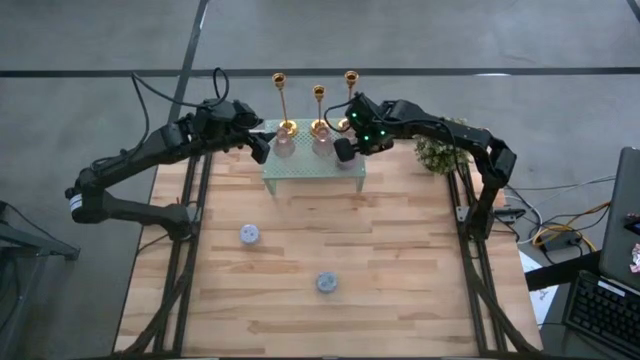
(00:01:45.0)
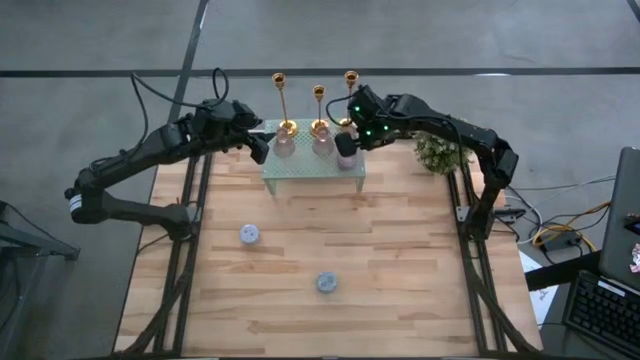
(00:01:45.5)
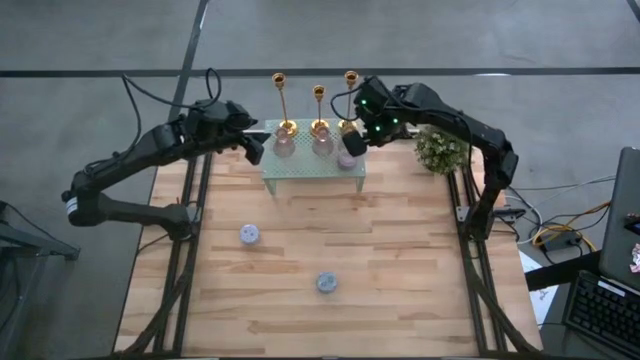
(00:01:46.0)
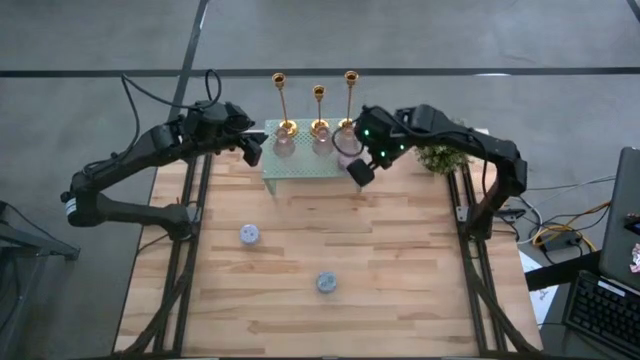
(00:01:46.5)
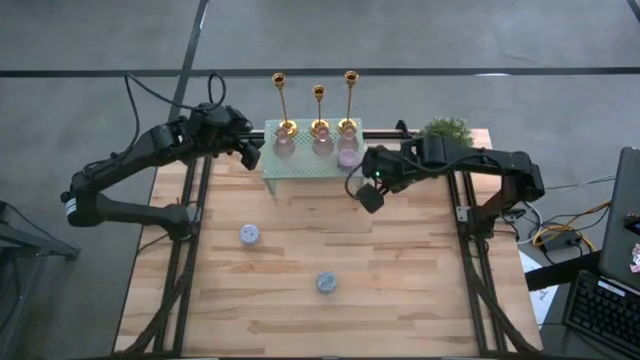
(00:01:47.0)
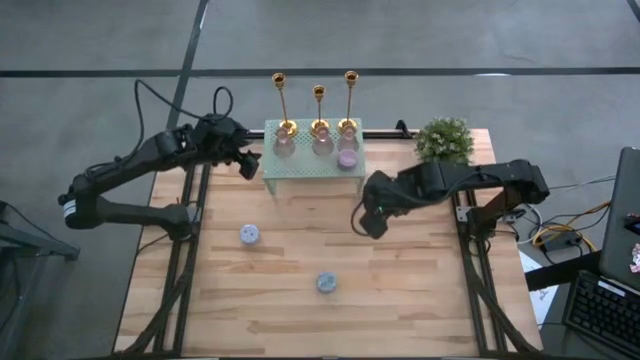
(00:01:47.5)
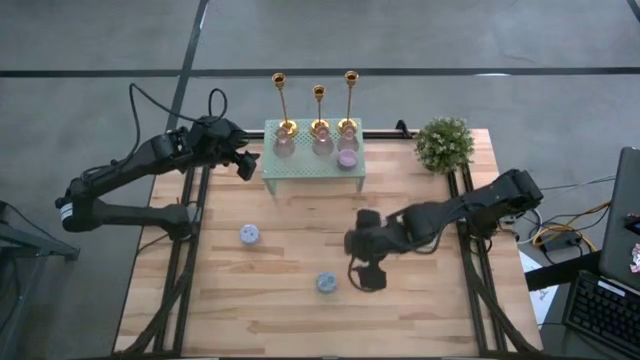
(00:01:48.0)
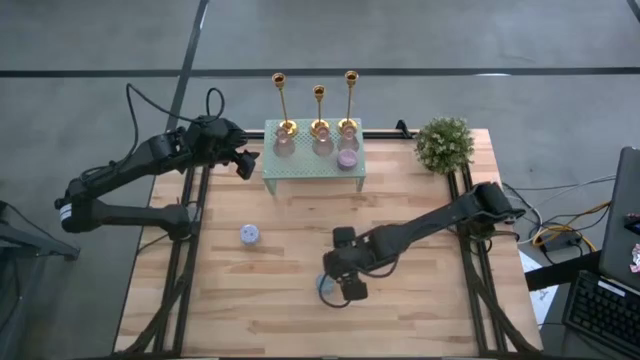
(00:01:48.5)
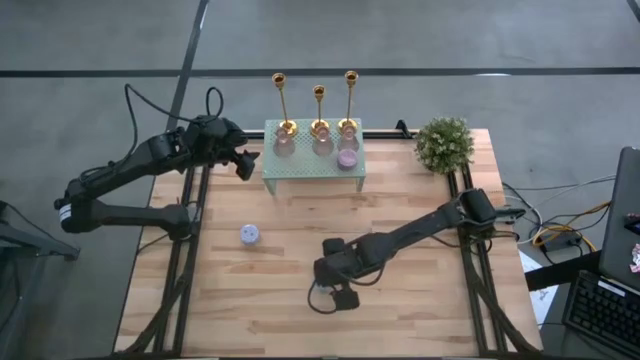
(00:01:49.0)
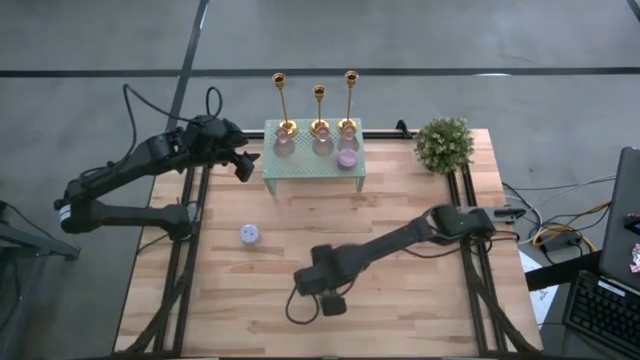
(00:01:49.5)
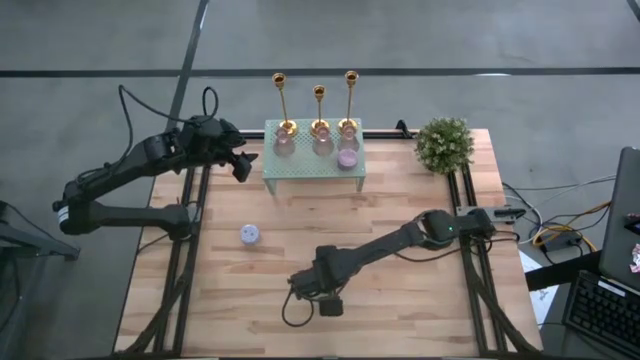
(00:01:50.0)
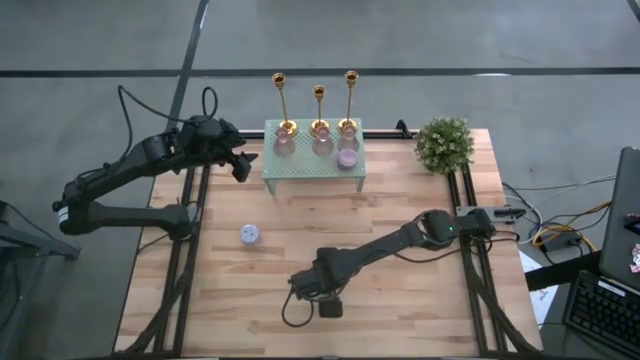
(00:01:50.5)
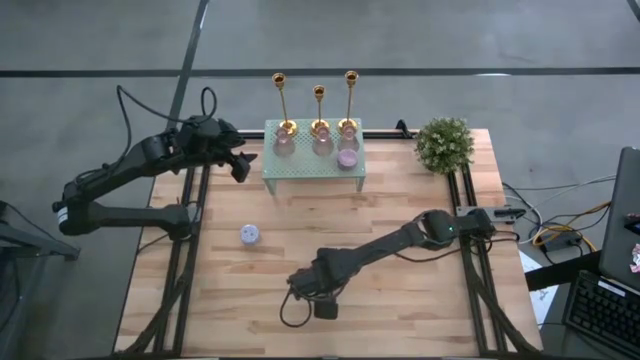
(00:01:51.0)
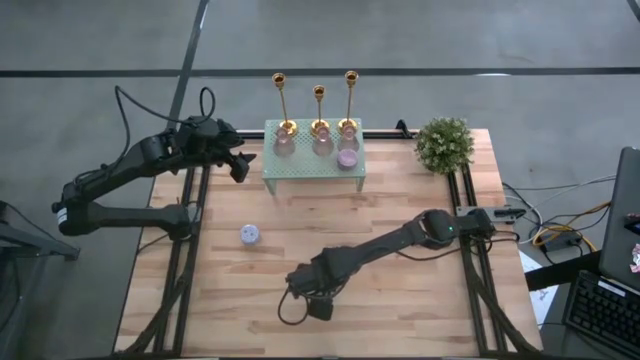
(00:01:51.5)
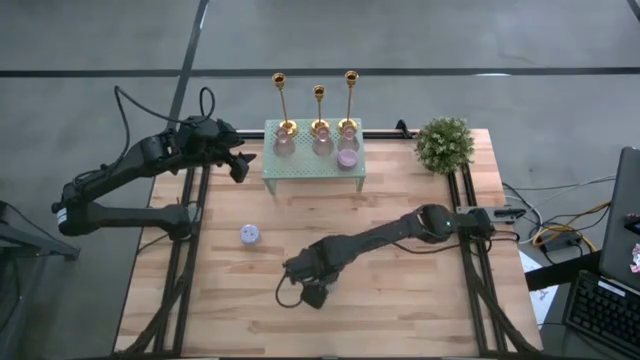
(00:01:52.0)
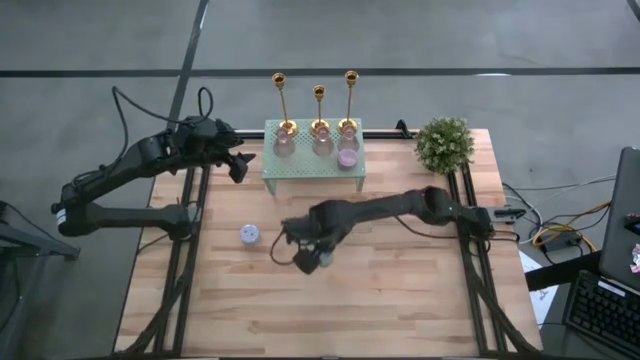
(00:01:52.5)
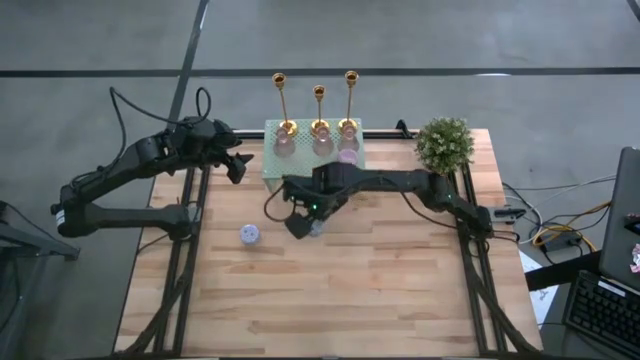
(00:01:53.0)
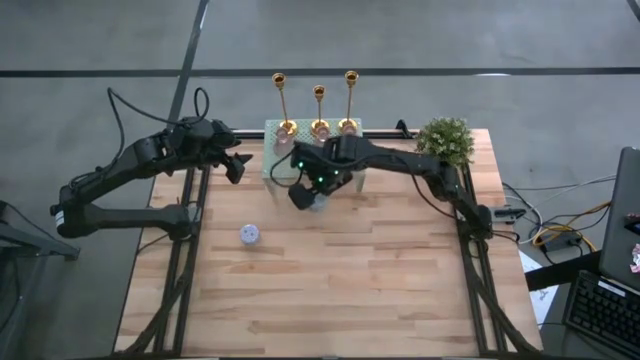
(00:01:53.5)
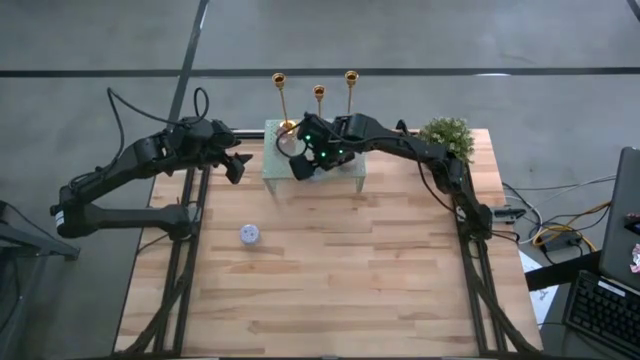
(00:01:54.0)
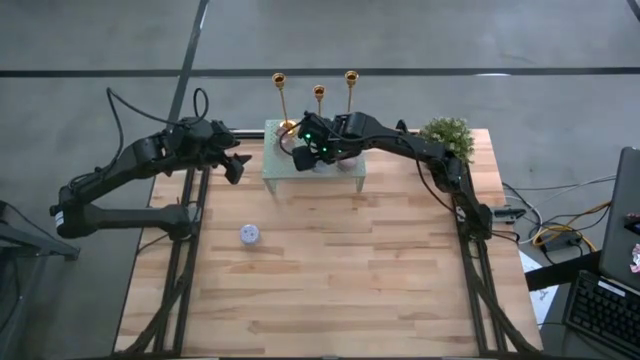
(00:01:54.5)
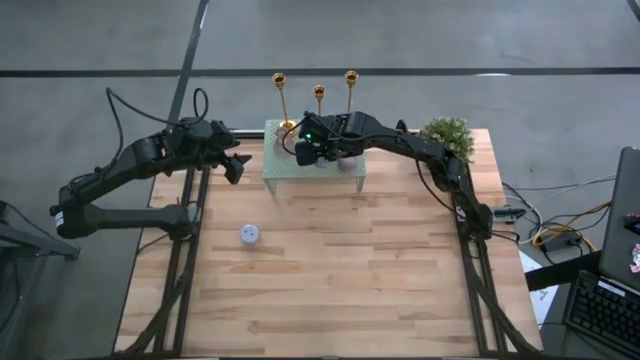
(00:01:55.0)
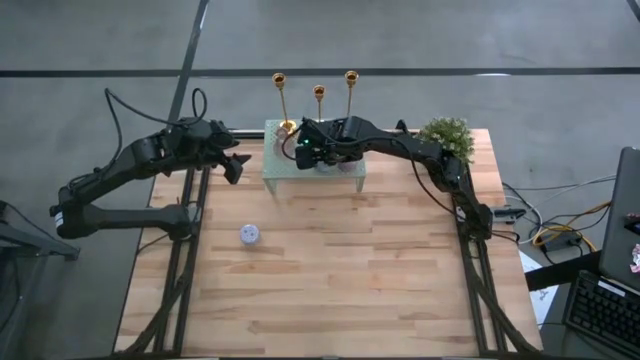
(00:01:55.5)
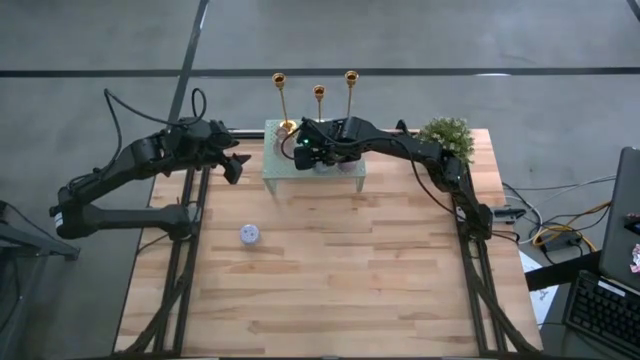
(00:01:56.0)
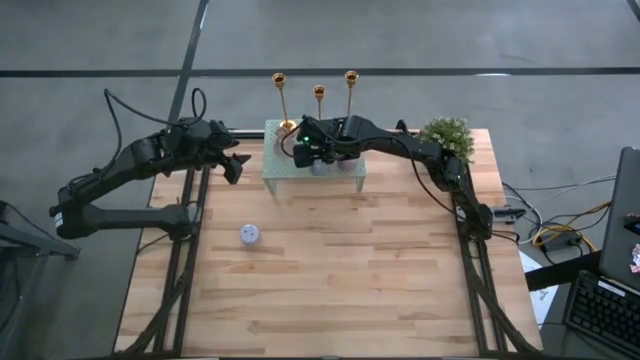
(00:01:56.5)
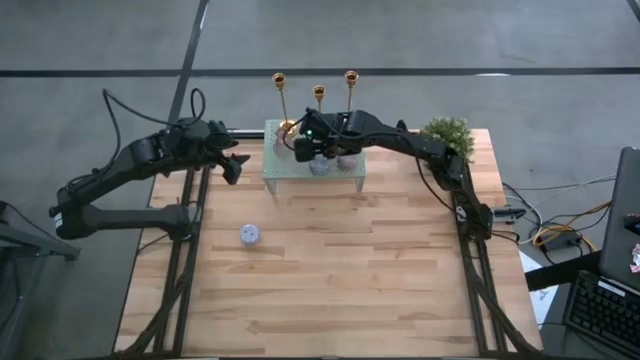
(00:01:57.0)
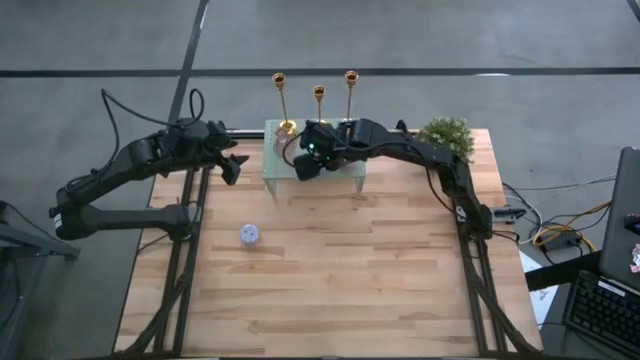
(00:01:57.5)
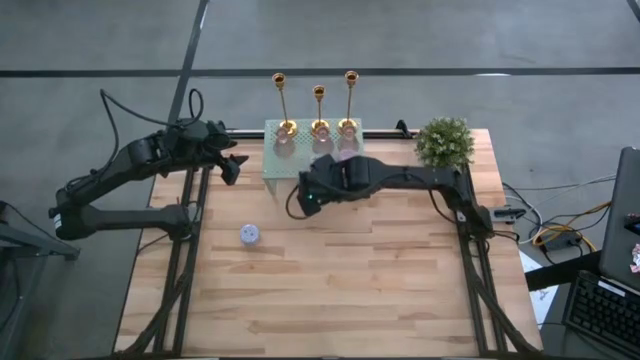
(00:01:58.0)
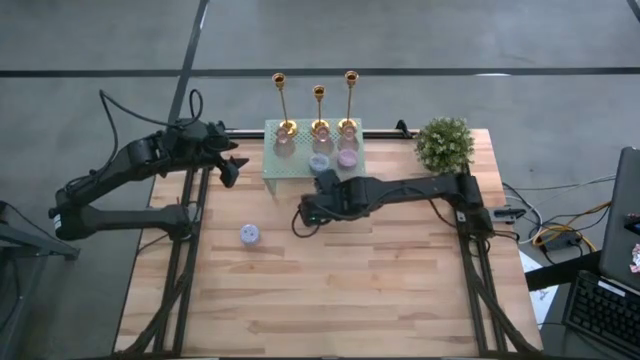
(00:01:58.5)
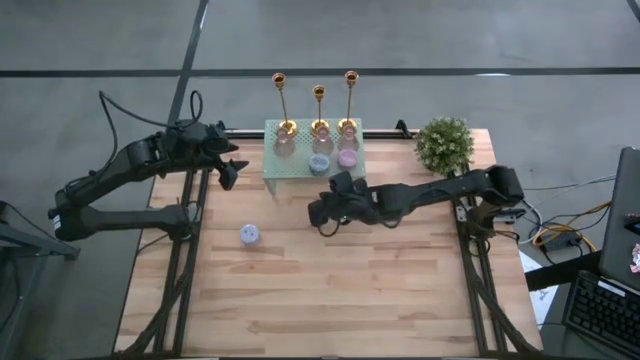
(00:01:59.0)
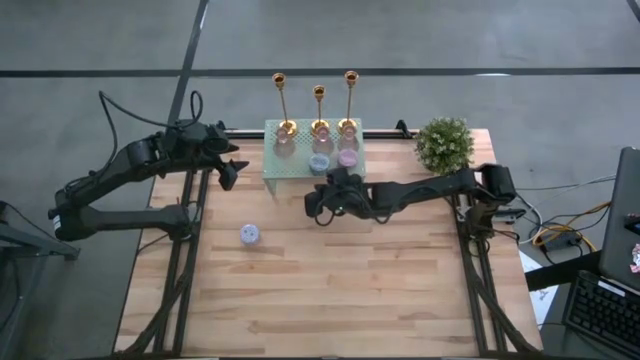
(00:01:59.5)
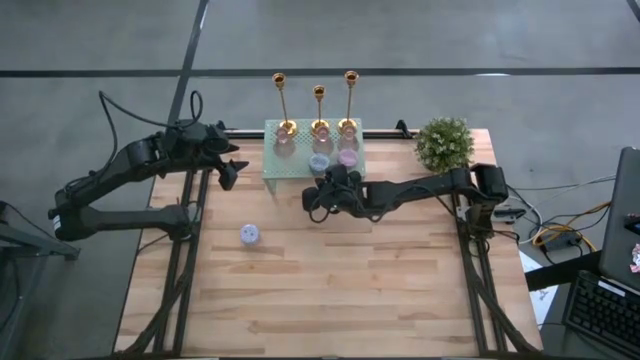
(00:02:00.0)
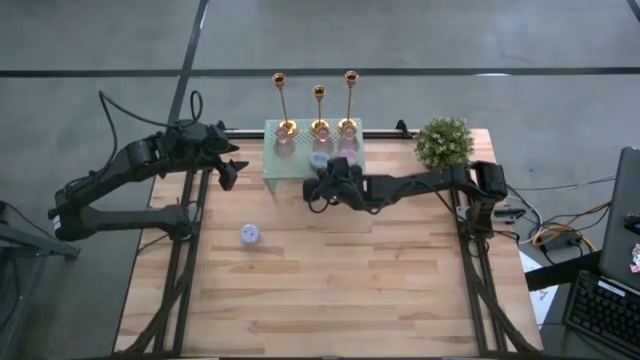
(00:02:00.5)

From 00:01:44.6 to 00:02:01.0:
Task: Pick & Place candle stick holders
Put the blue scented candle on the shelf
